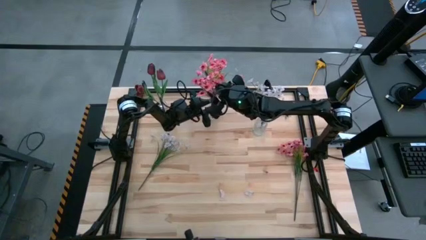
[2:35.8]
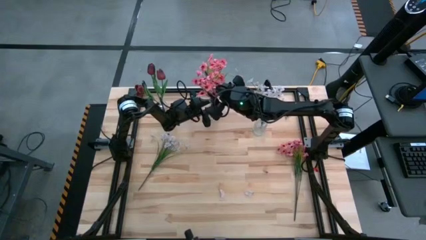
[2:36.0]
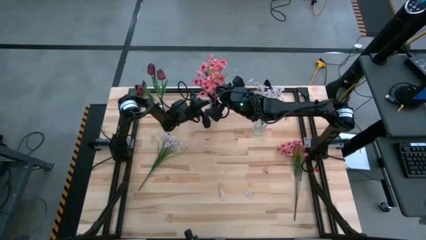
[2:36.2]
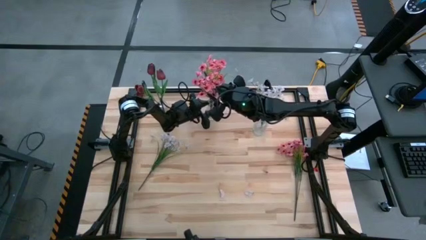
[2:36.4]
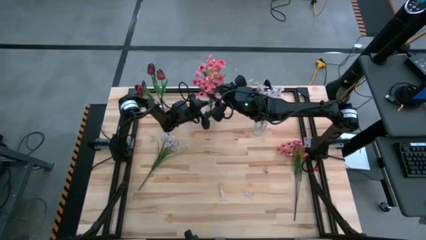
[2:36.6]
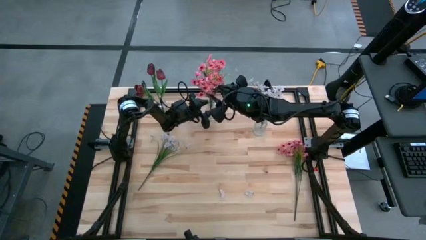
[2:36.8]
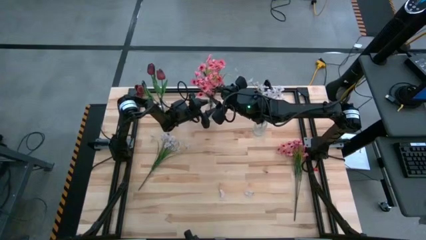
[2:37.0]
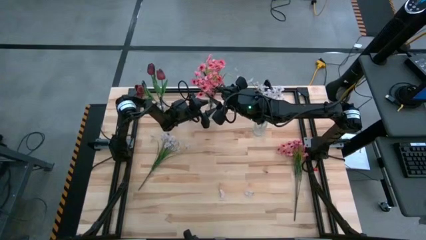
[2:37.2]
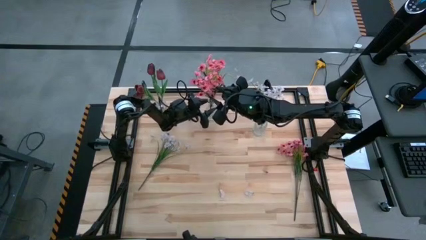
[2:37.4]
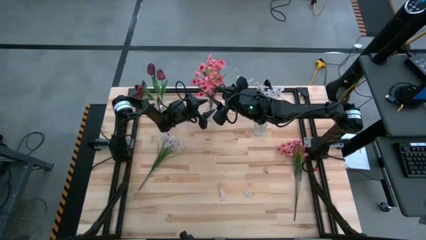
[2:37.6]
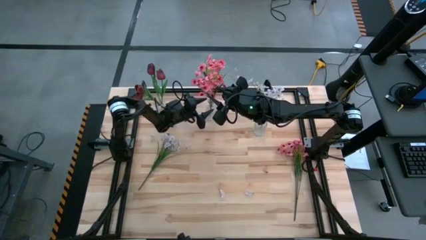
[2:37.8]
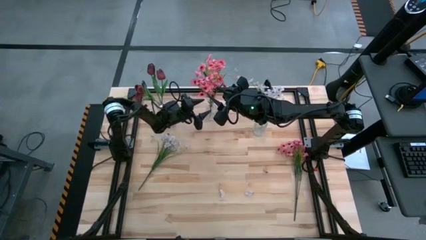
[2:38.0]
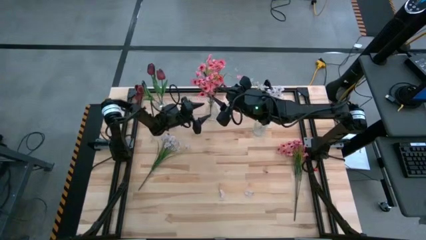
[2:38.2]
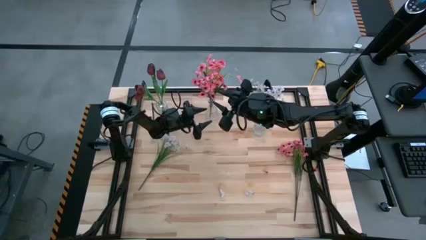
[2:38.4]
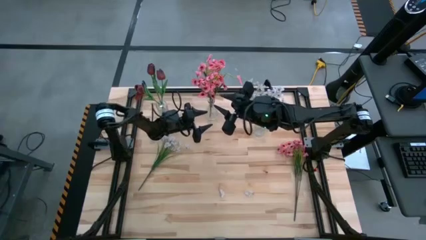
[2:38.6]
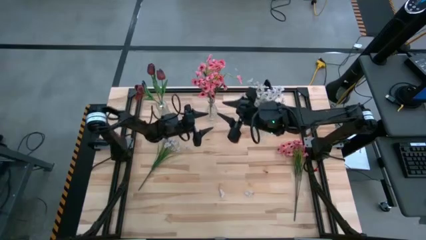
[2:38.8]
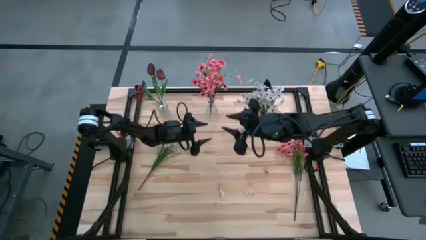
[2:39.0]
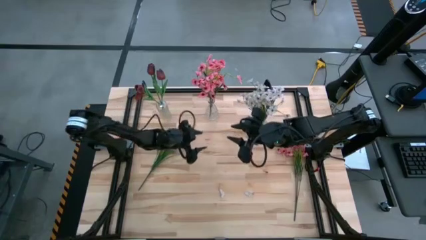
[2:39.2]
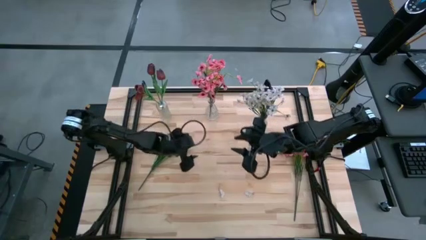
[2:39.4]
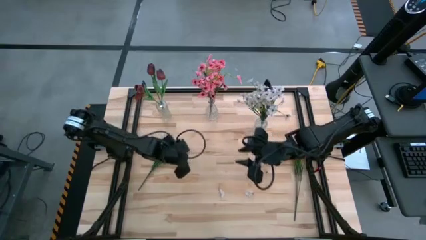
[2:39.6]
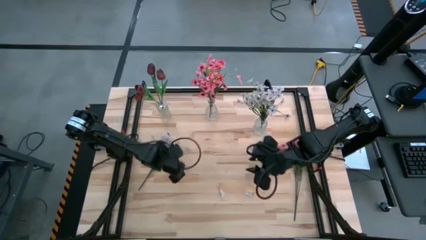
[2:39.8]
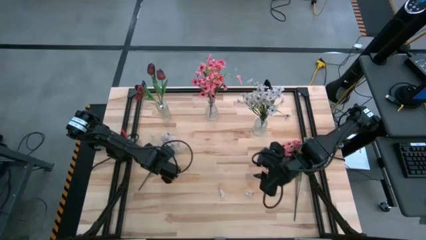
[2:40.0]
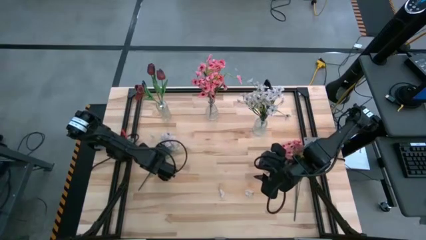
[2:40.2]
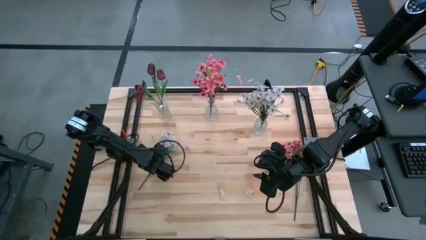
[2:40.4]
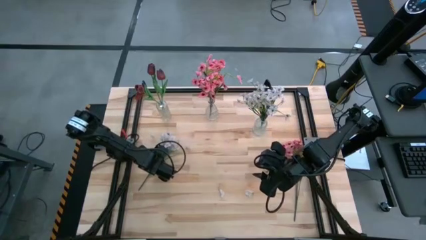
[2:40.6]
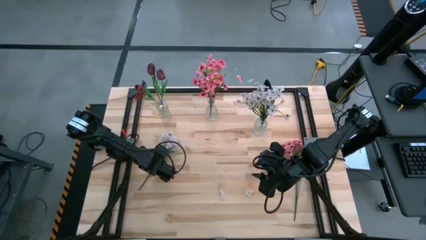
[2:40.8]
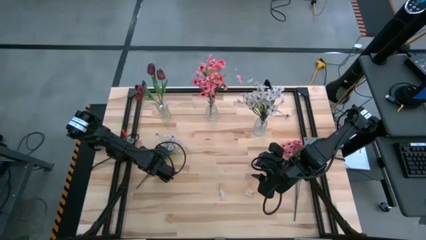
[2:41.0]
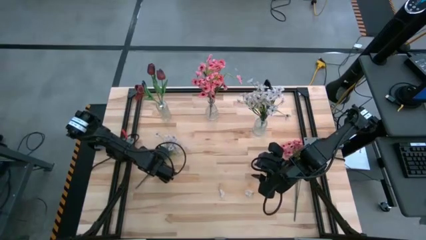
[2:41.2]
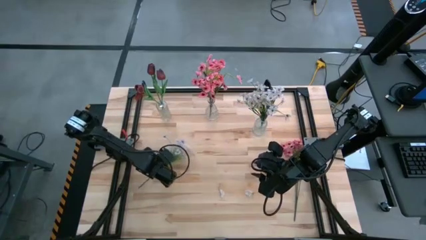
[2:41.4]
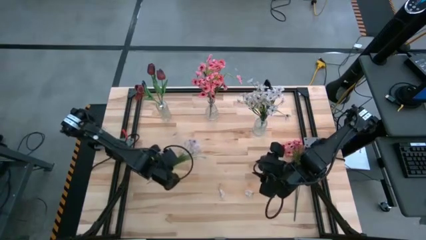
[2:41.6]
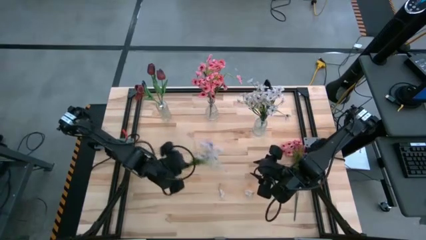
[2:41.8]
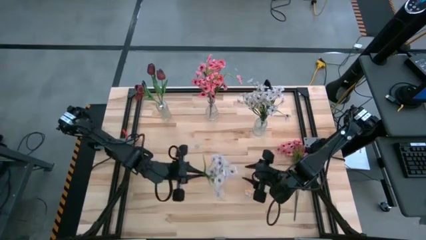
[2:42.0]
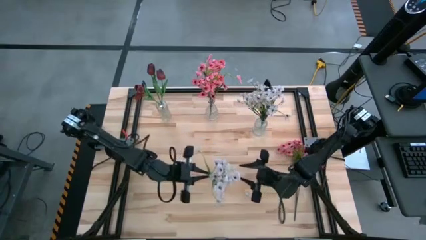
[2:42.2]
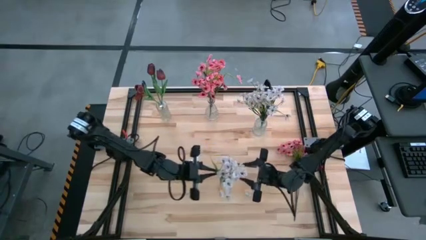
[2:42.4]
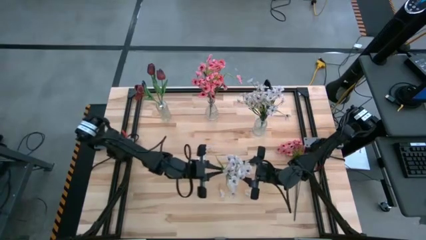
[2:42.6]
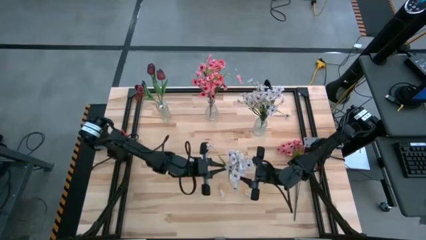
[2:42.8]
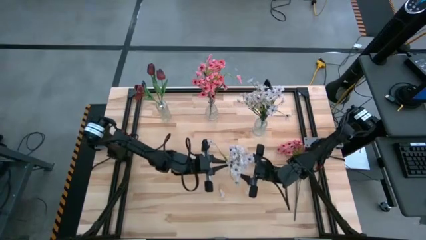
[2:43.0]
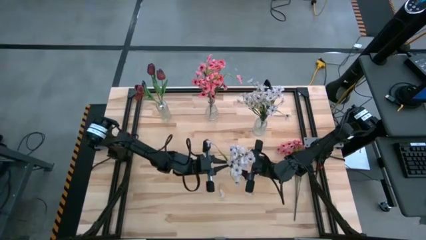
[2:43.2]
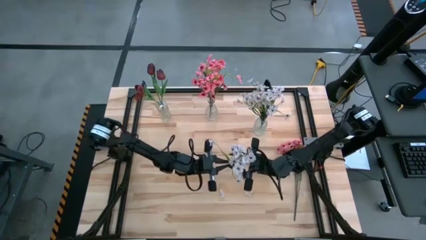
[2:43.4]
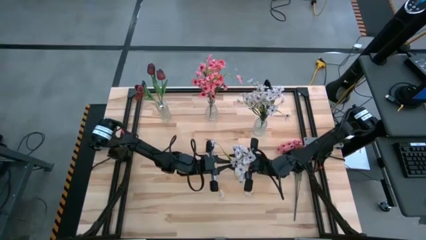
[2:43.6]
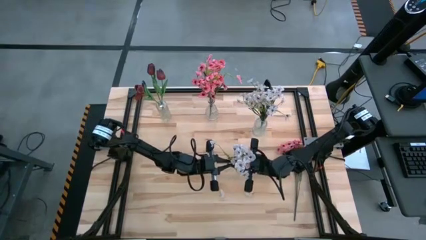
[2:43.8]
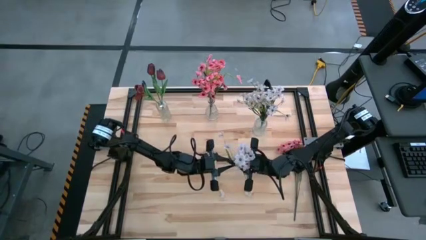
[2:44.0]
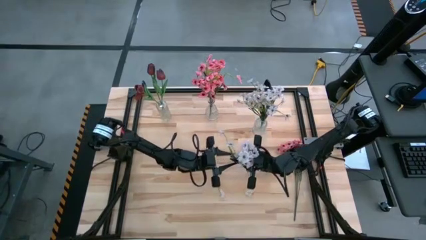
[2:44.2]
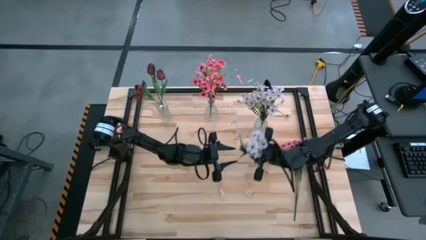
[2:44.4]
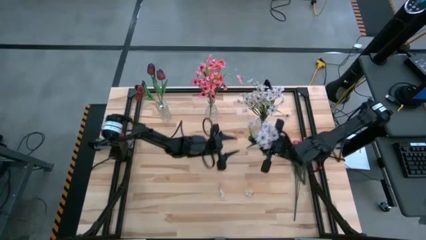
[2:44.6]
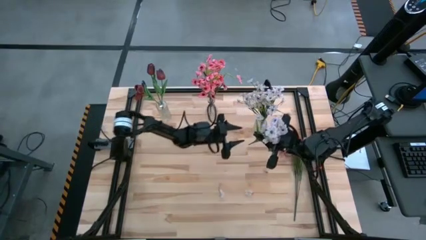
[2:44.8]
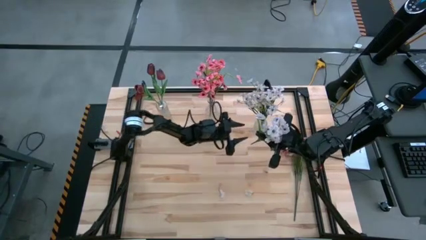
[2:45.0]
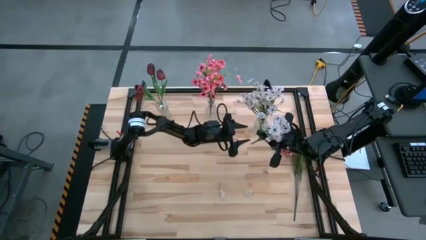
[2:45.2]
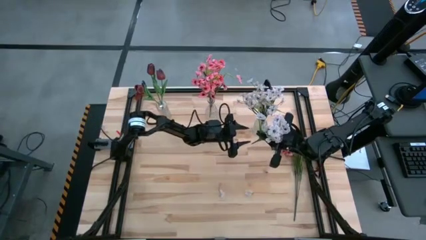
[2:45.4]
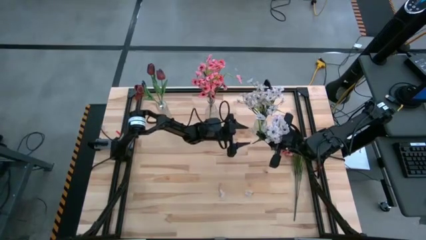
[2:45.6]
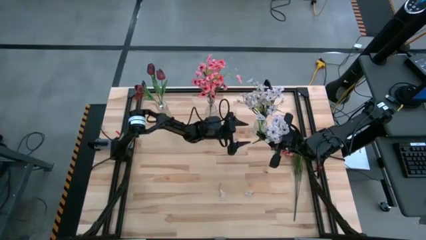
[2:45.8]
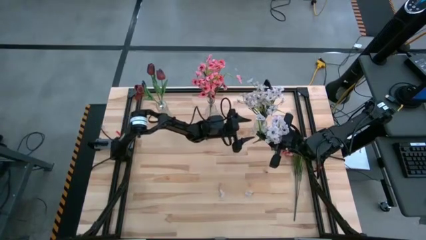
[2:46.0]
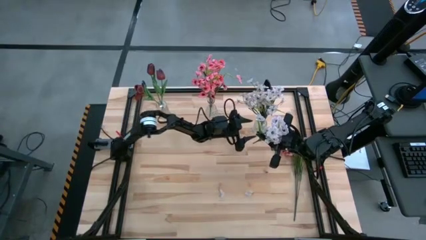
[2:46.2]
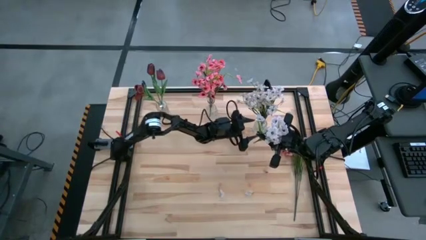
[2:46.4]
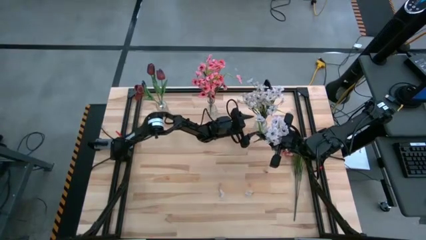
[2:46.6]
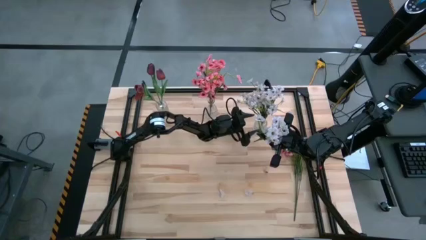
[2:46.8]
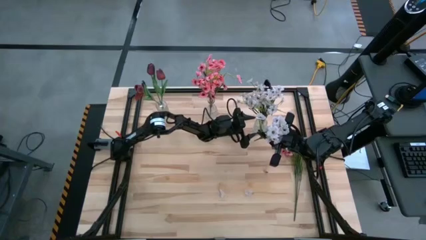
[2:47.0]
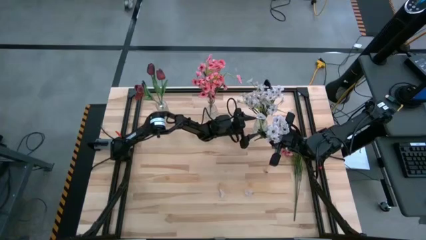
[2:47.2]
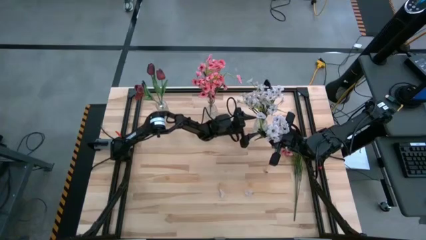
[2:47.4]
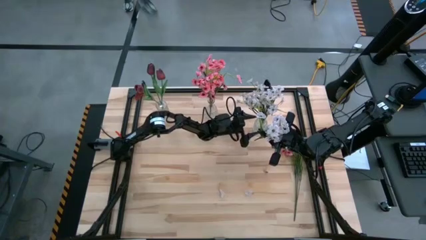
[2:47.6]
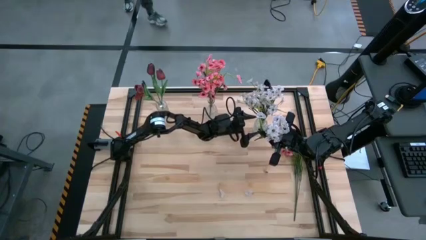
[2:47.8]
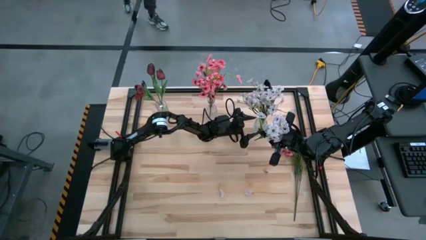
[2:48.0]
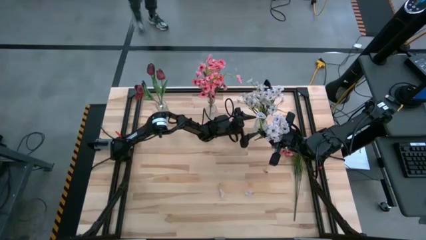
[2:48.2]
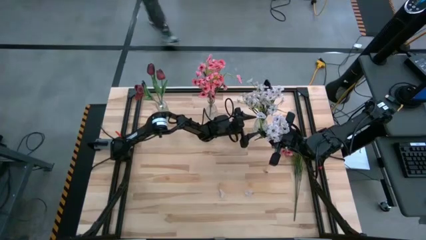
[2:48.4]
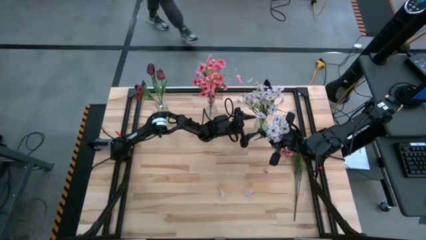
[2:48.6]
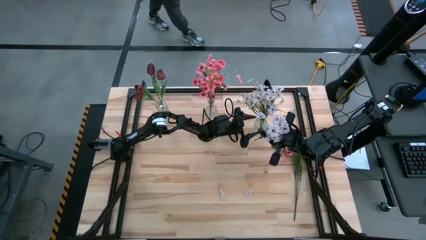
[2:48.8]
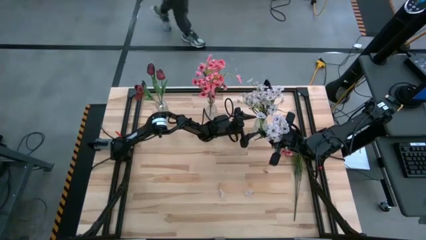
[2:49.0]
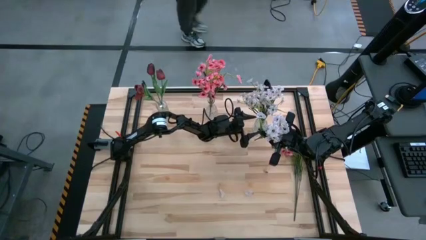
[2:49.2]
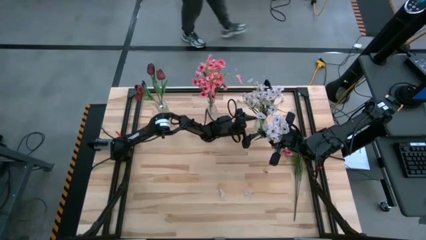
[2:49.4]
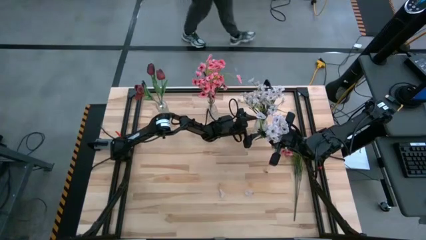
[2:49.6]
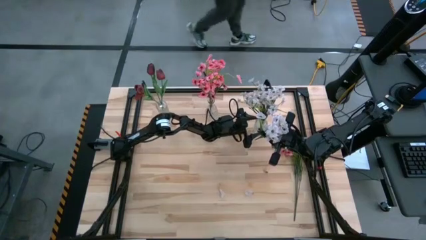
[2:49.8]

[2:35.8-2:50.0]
Task: Sort flowers into vase by color
Put the white flowers into the right transparent vase
